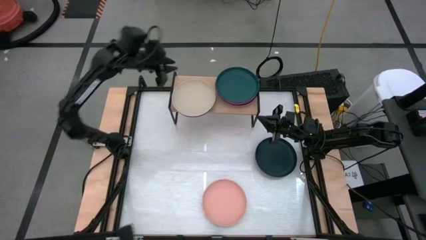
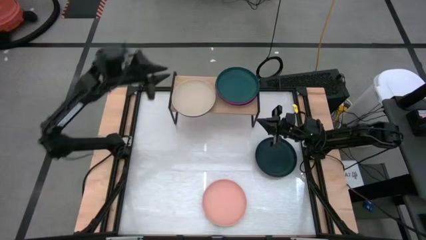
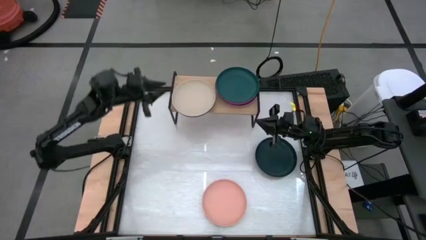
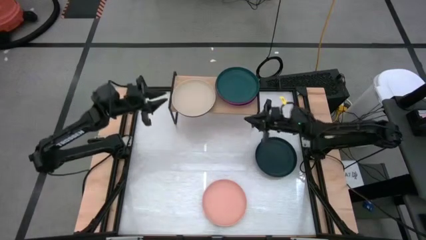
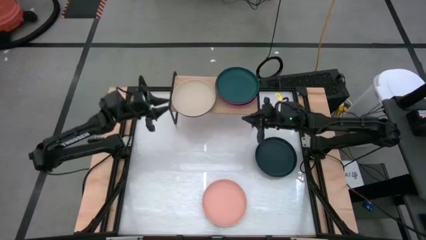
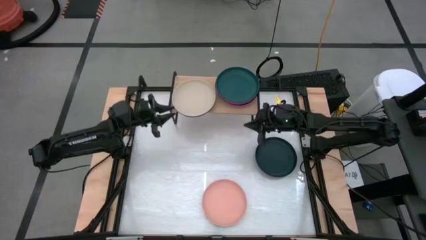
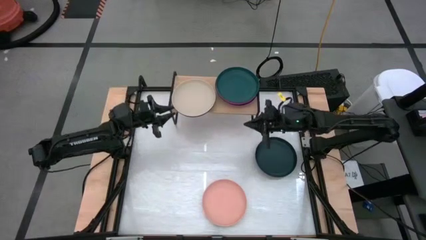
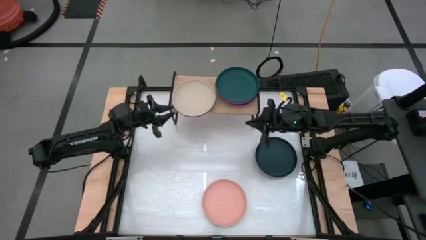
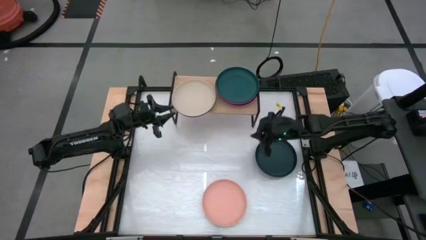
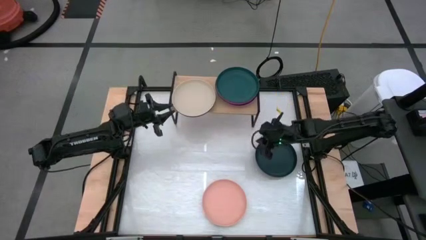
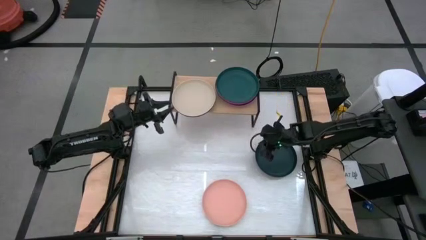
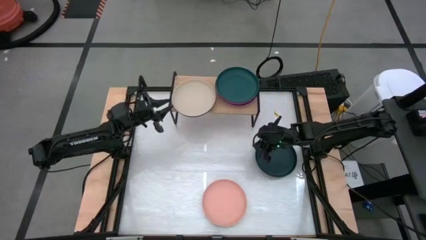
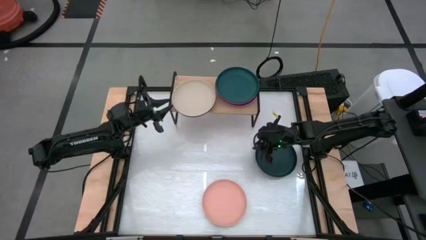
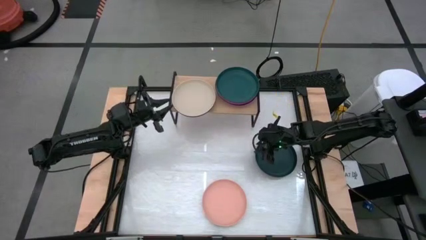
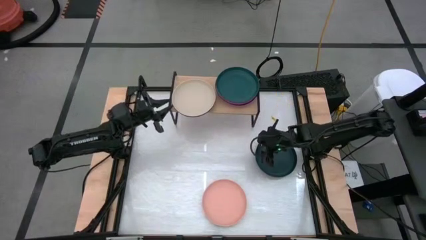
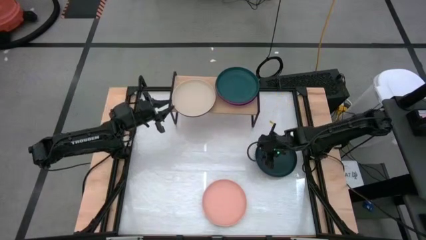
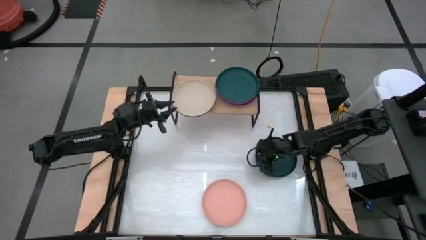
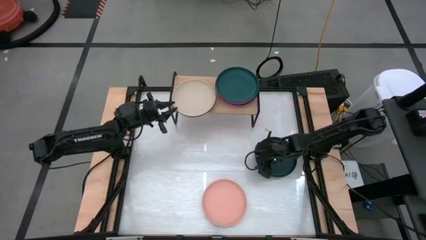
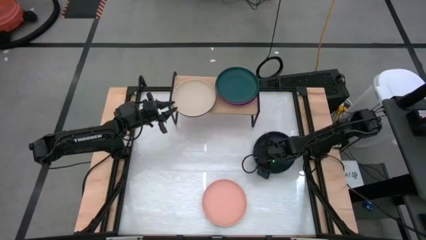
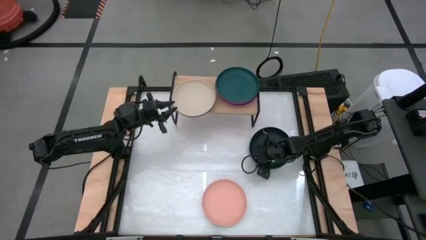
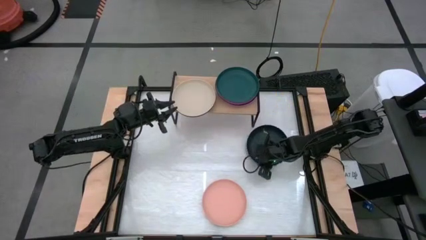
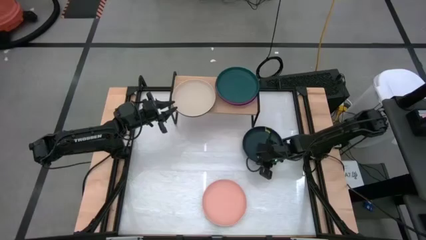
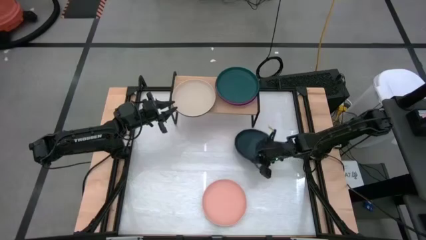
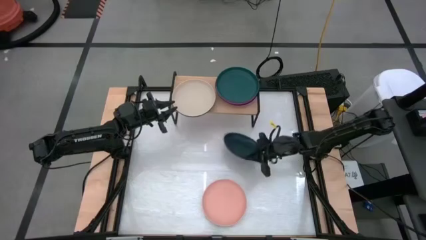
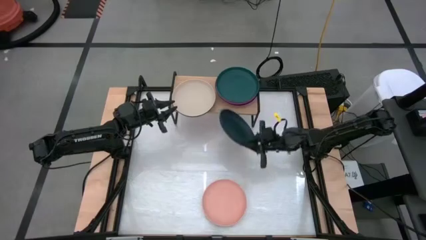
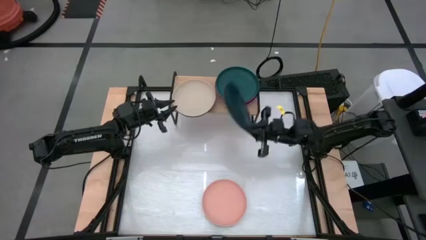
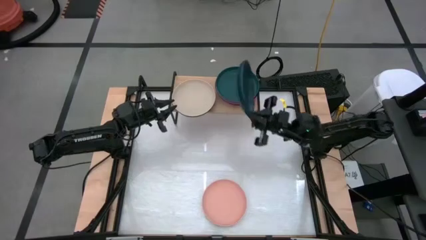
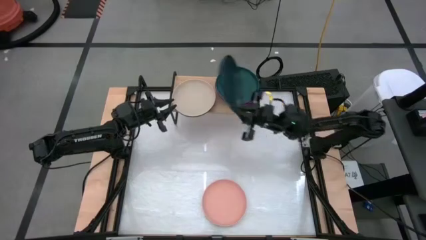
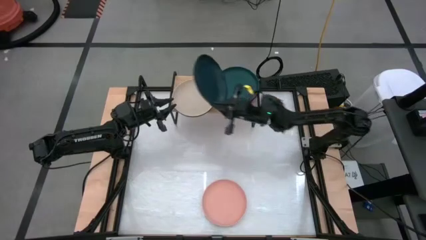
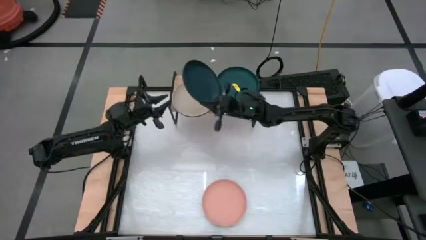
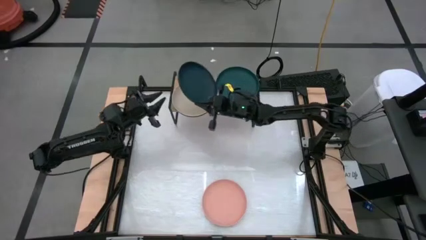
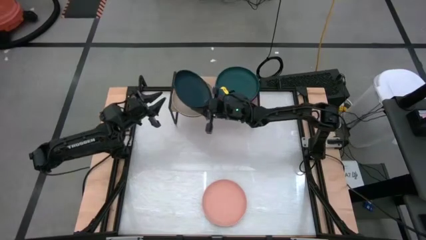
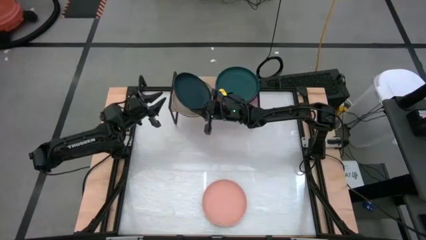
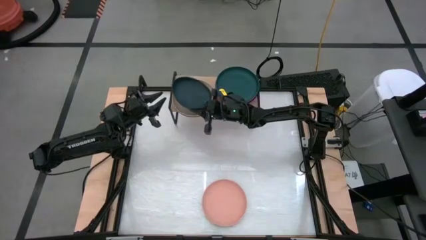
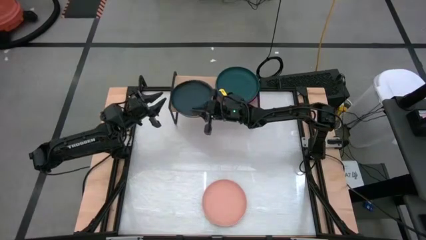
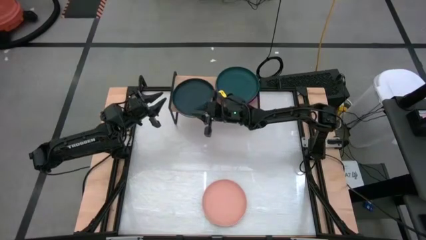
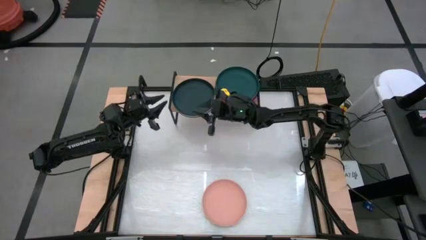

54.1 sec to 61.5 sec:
Task: Place and stack plates onto a shelf
Stack the dark green plate on top of the light brown plate on the shelf

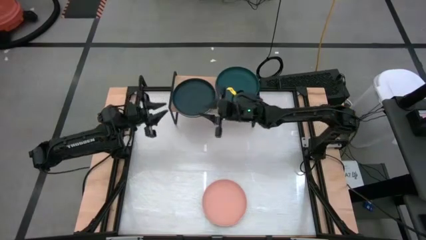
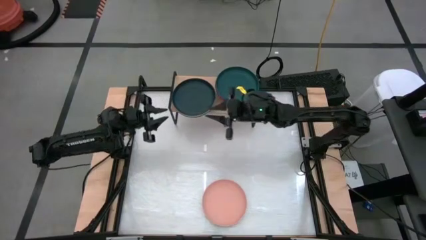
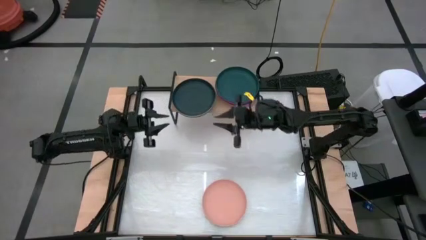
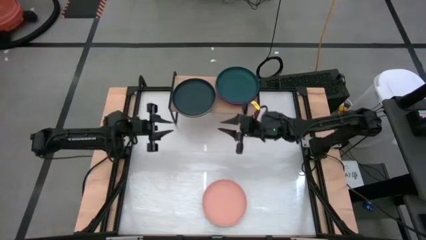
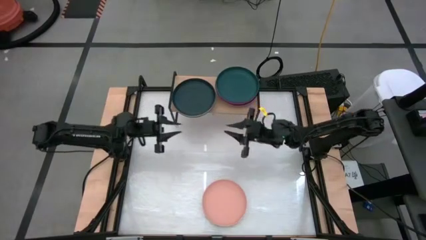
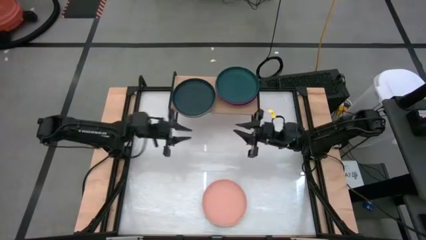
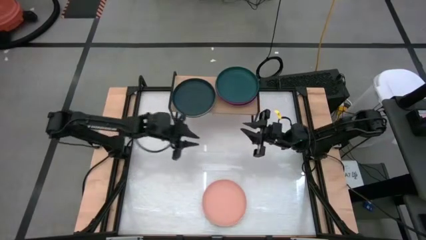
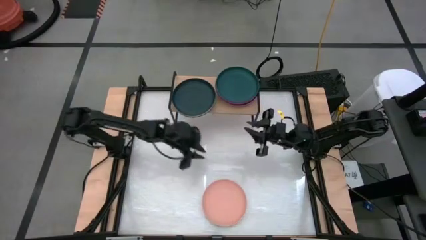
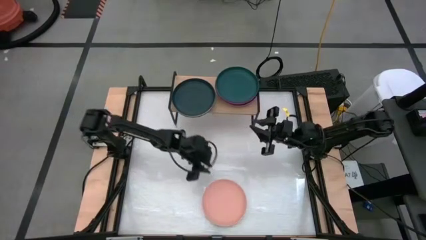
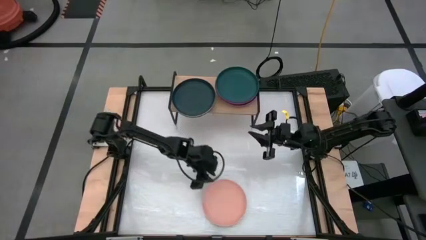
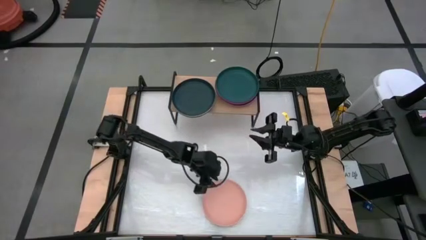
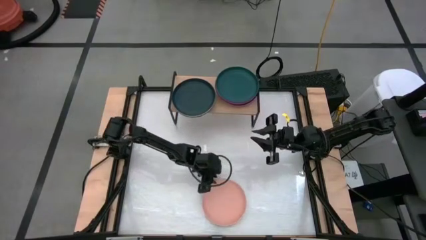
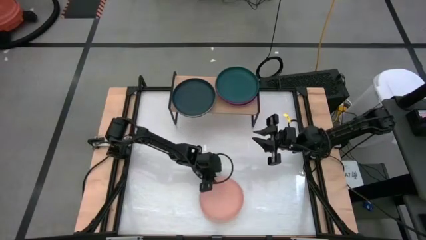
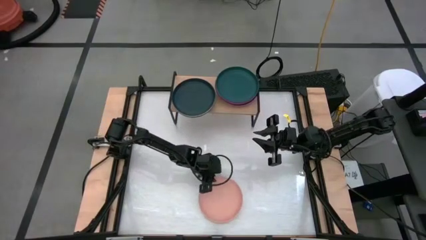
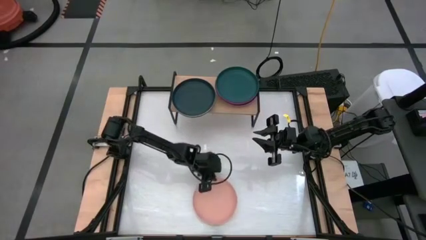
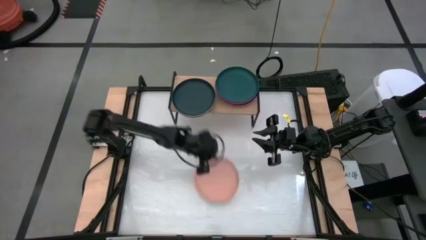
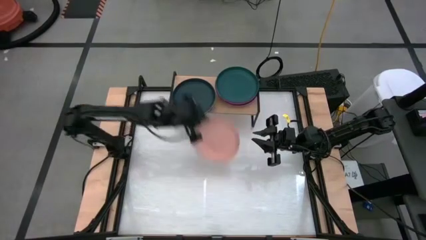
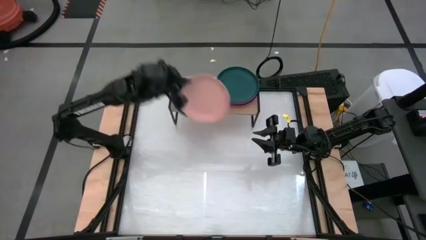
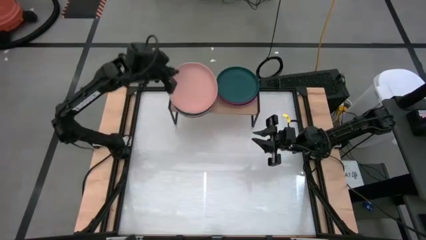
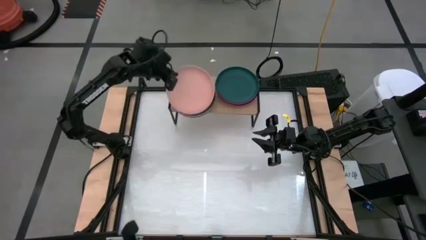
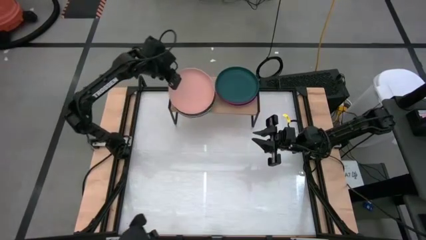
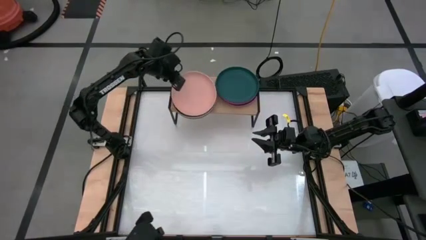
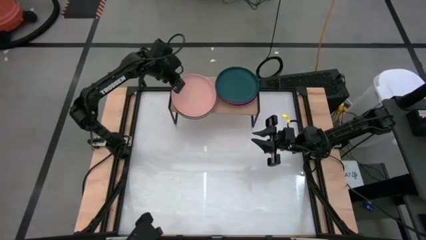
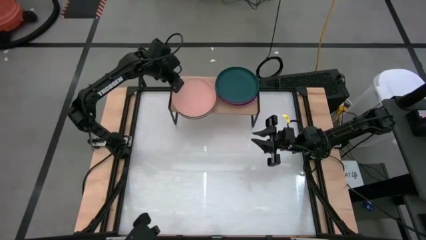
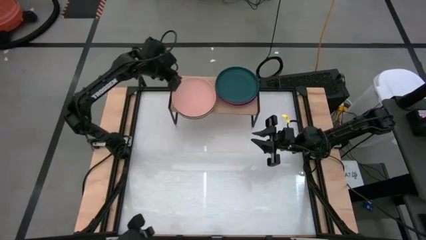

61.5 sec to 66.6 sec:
Stack the light orange plate on top of the dark green plate on the shelf
